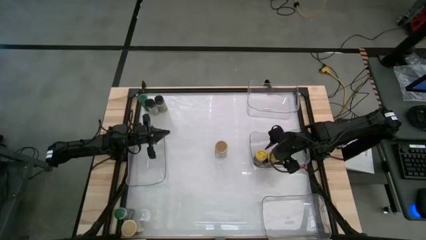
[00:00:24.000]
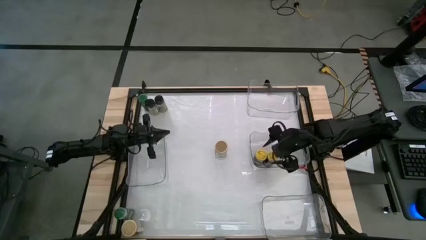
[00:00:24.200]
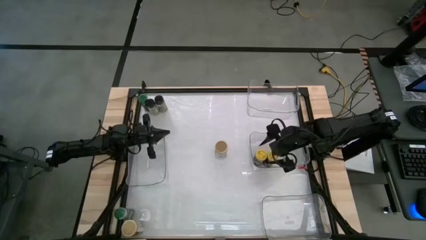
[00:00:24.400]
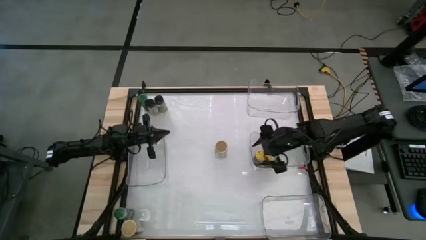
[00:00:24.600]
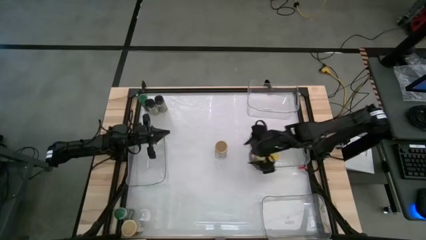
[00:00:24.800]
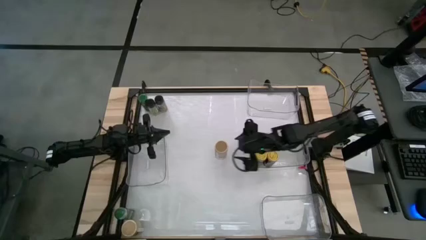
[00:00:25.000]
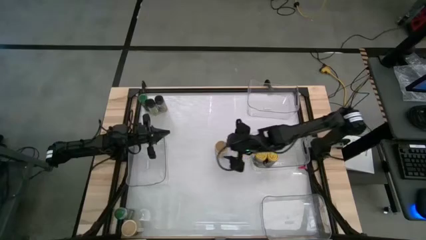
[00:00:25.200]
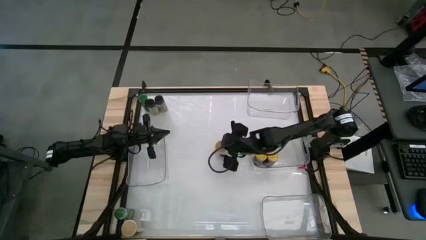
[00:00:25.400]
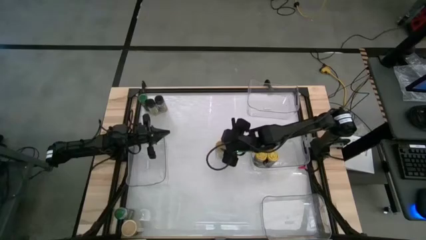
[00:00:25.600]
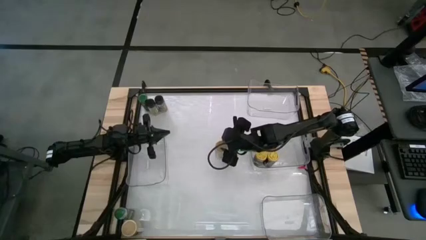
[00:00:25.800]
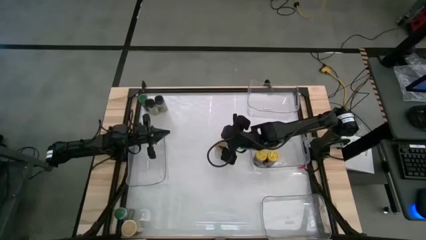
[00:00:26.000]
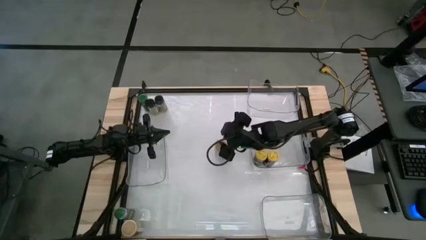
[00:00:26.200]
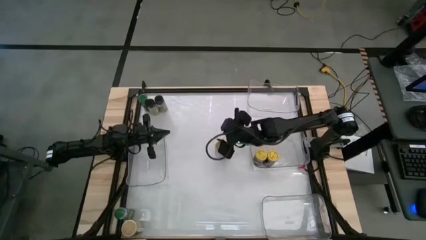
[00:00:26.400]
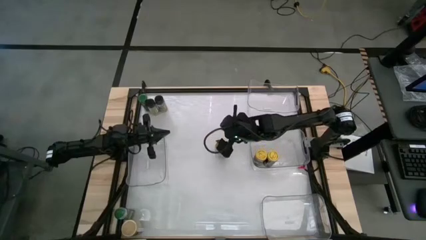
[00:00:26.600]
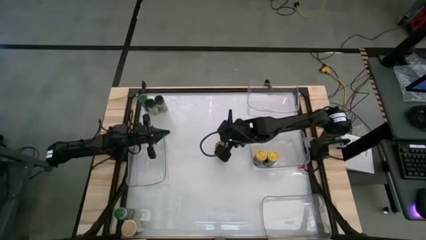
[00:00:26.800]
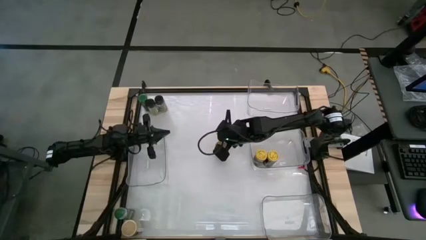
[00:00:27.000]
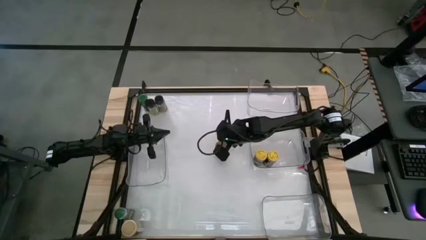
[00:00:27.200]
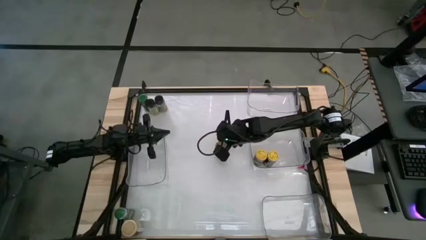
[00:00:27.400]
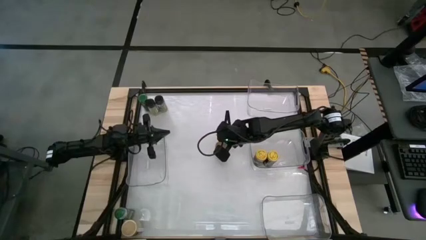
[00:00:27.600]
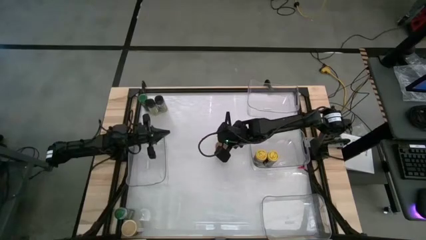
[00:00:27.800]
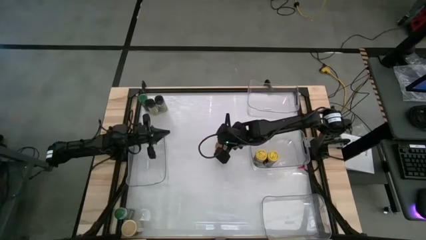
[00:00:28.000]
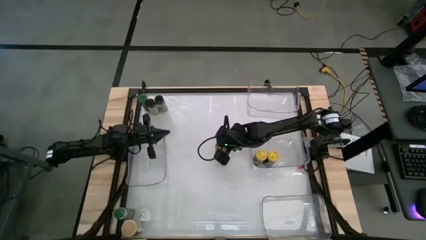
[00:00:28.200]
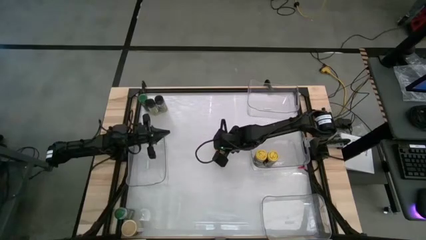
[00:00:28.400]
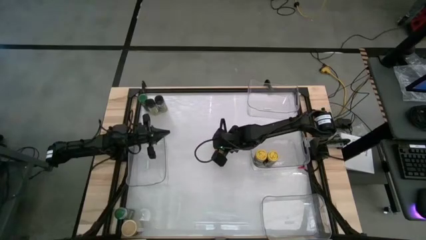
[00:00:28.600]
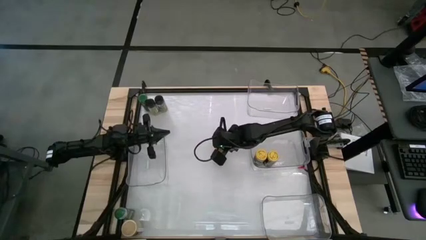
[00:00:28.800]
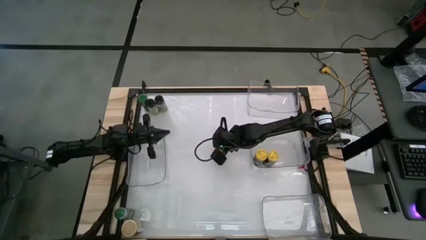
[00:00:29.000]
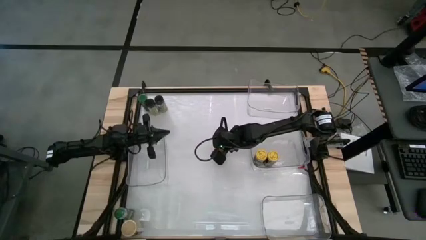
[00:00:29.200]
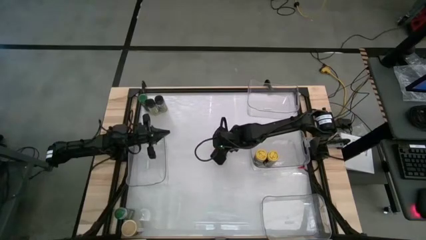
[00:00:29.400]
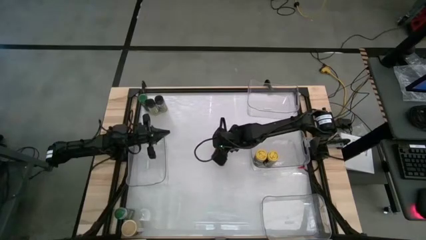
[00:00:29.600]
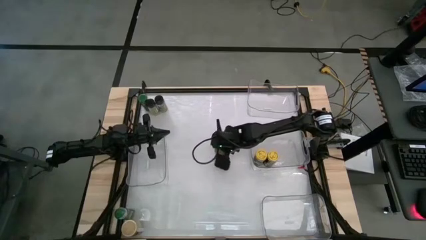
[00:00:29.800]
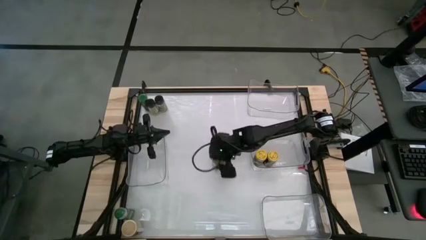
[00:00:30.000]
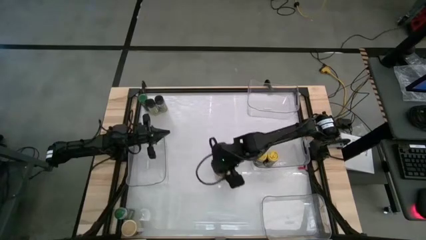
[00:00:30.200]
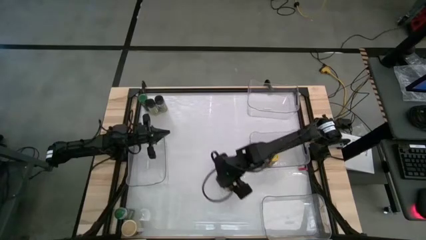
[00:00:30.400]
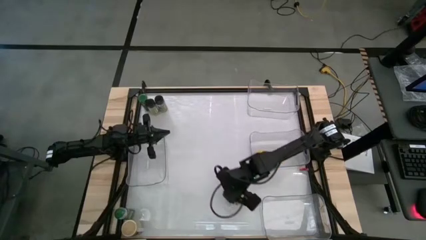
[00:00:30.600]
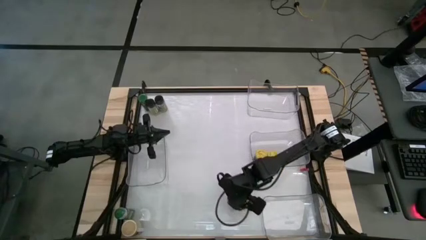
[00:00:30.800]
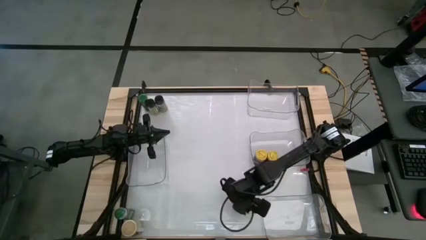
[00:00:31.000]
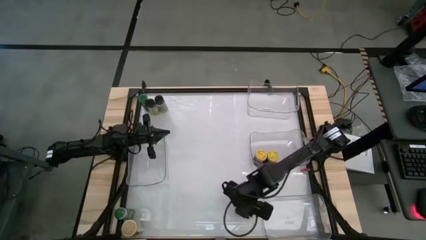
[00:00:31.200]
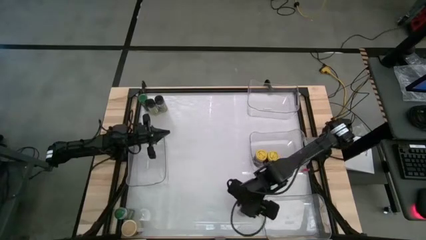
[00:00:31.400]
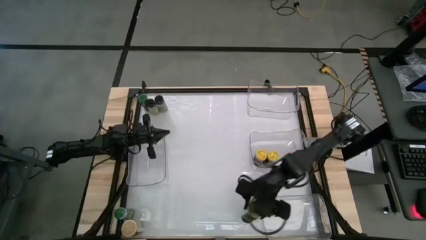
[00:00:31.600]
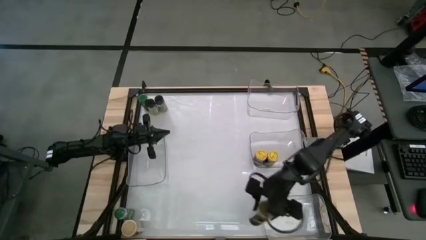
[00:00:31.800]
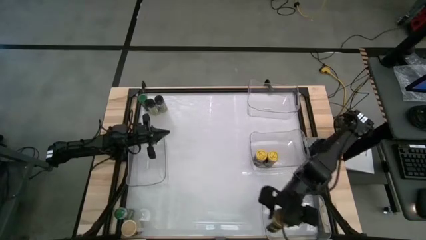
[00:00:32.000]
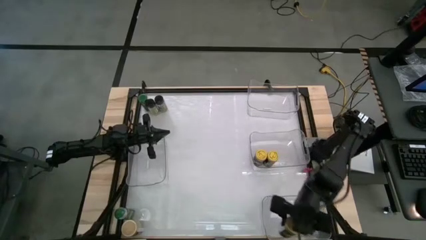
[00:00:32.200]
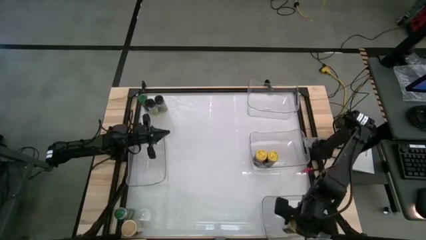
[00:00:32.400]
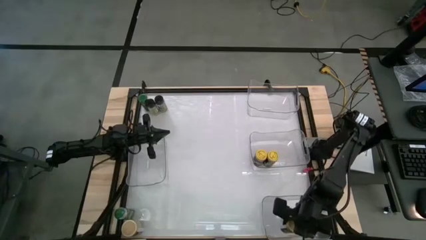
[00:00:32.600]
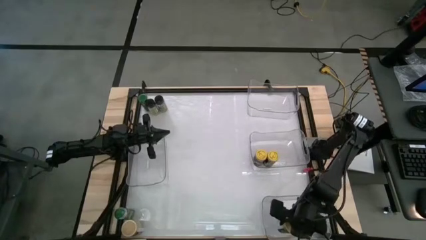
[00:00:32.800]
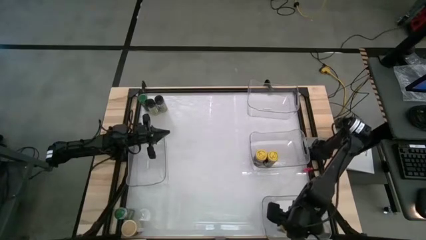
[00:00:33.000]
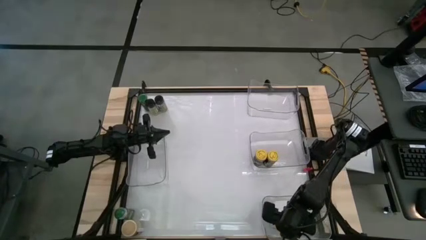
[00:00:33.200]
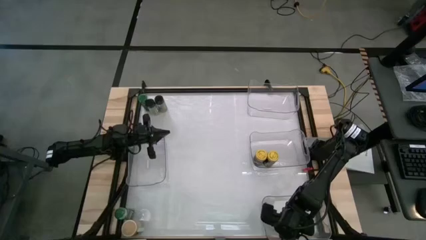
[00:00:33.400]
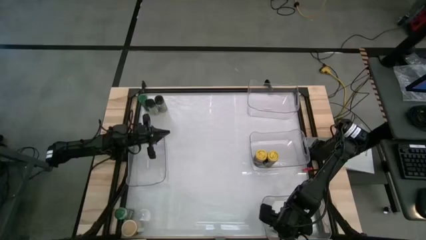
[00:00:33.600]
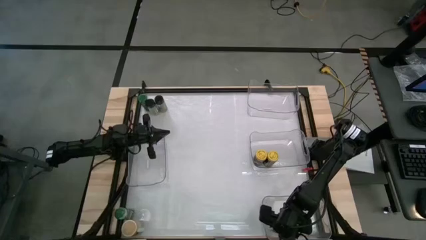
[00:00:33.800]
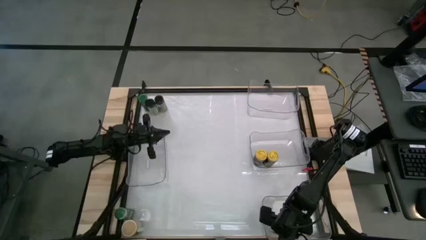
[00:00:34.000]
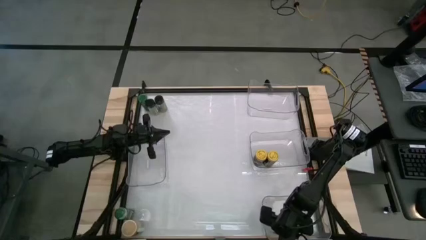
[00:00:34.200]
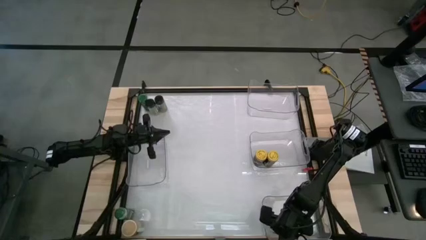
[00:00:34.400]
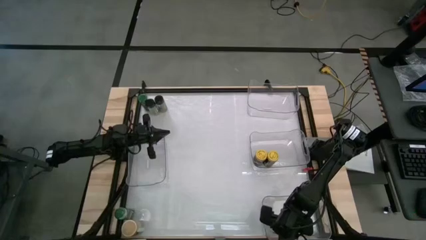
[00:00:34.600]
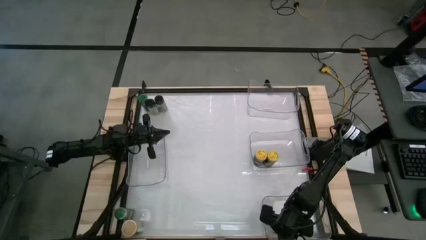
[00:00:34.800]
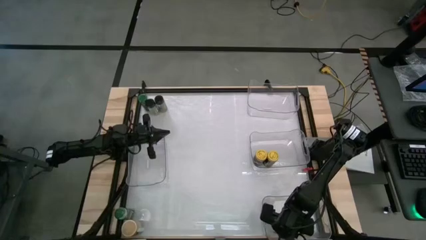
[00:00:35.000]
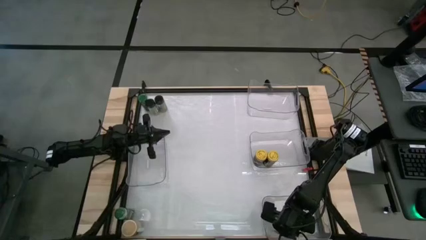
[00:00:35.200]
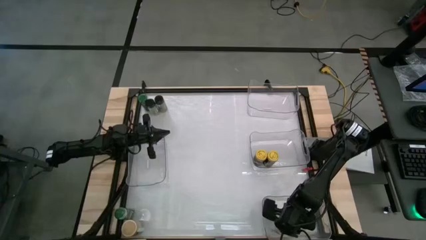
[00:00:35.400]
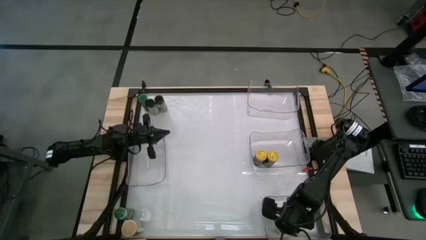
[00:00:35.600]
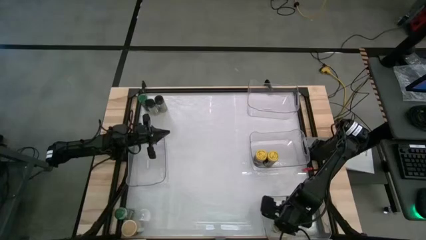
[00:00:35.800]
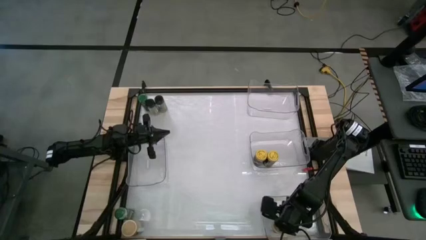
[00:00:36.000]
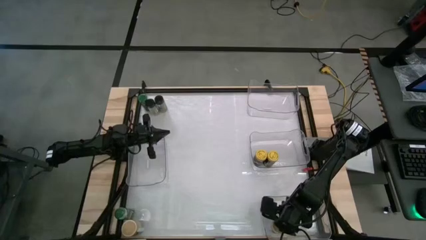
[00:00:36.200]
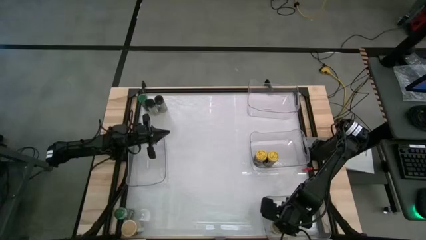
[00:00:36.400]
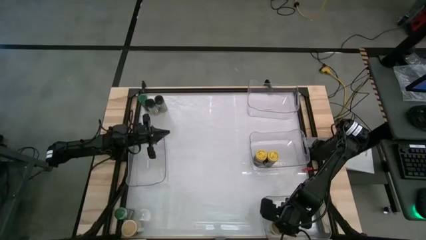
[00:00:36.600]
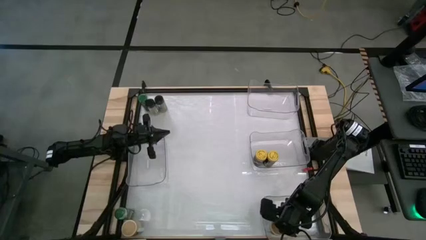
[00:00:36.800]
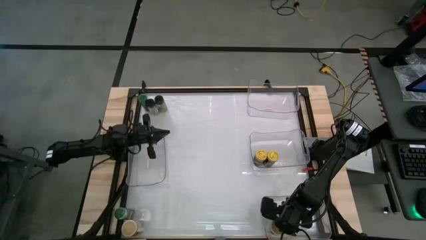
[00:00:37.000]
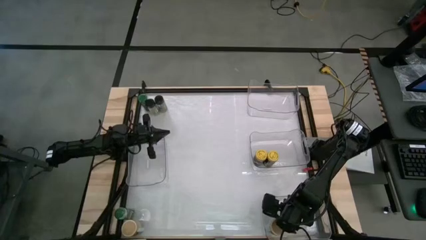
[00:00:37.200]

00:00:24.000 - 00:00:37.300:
Task: Sort spices by type
Put the top brown seasoning bottle into the bottom right transparent bin
